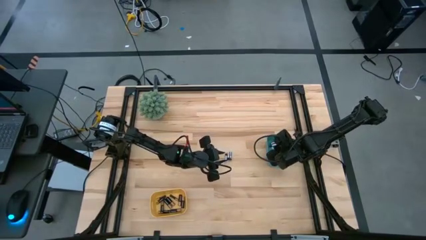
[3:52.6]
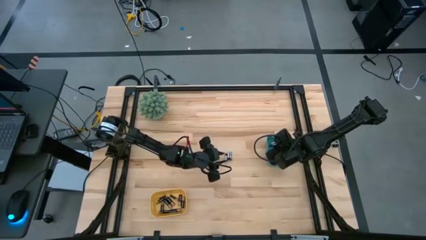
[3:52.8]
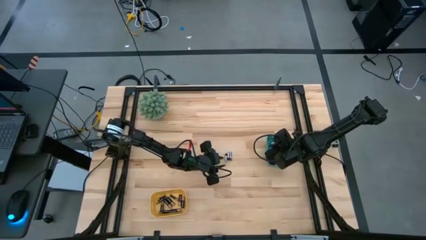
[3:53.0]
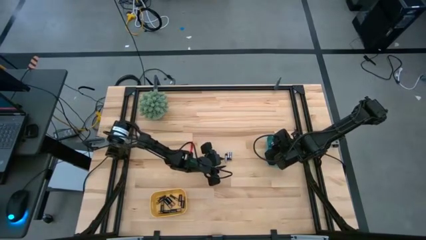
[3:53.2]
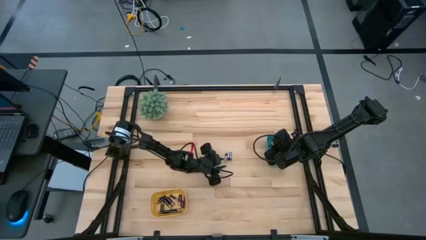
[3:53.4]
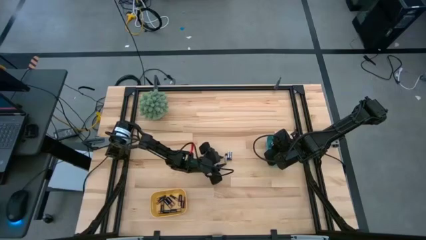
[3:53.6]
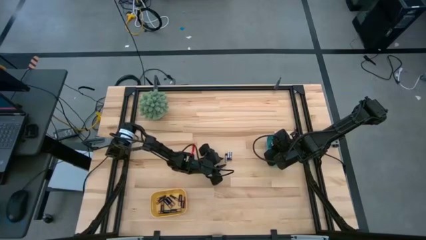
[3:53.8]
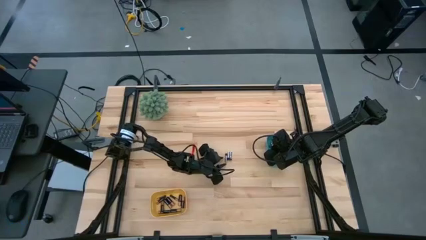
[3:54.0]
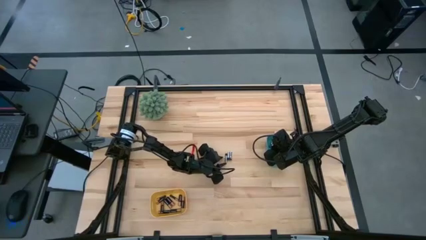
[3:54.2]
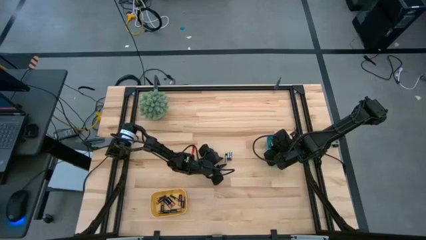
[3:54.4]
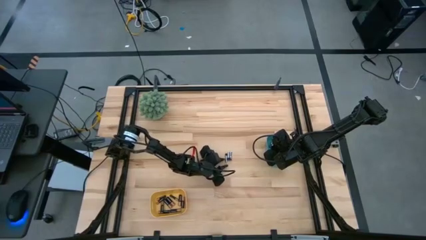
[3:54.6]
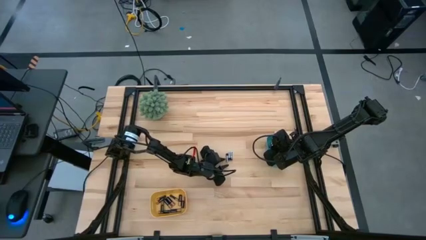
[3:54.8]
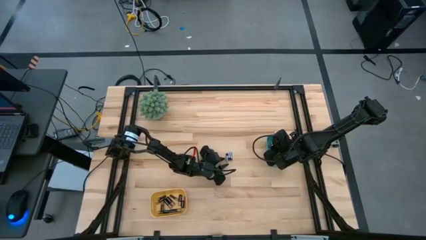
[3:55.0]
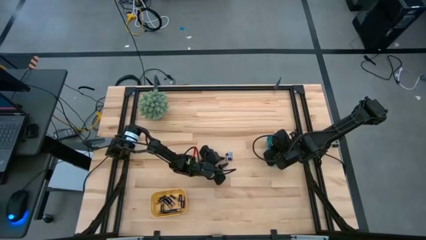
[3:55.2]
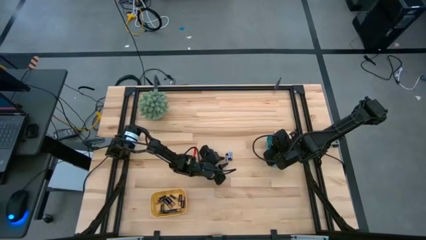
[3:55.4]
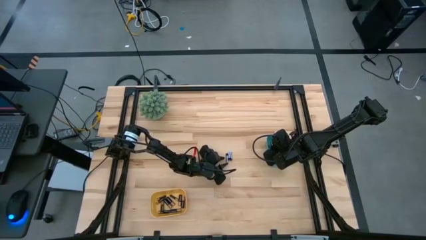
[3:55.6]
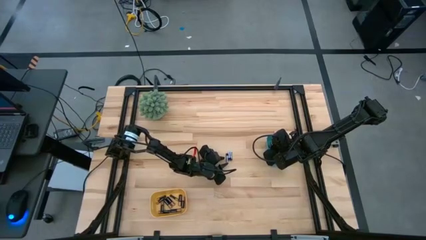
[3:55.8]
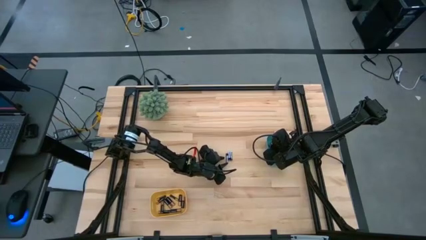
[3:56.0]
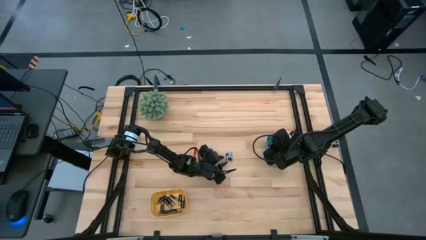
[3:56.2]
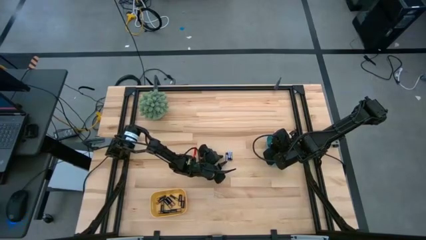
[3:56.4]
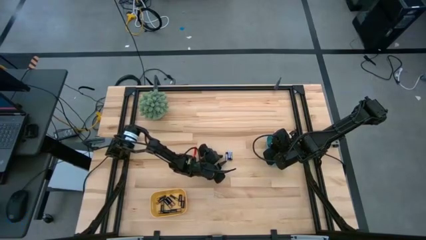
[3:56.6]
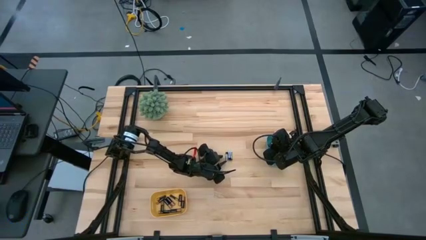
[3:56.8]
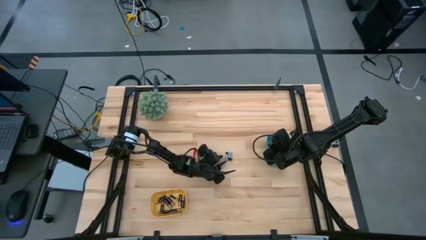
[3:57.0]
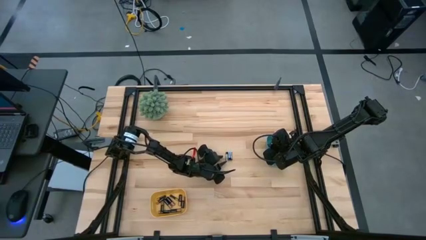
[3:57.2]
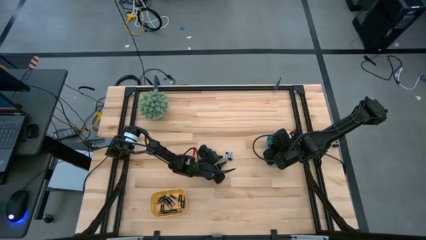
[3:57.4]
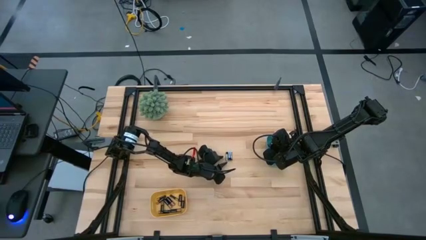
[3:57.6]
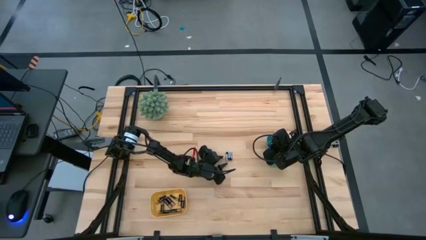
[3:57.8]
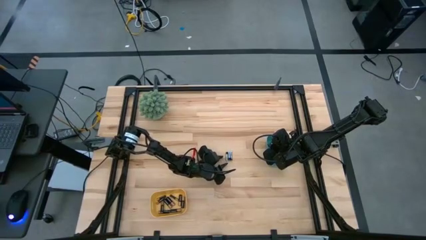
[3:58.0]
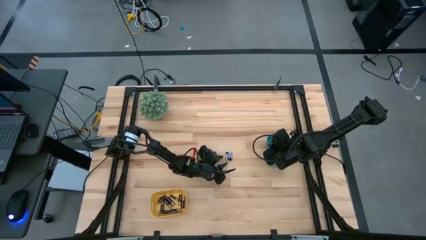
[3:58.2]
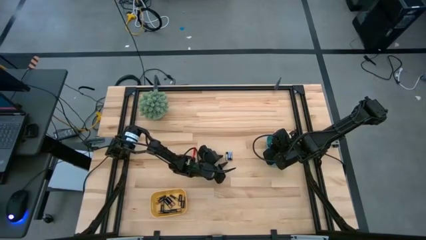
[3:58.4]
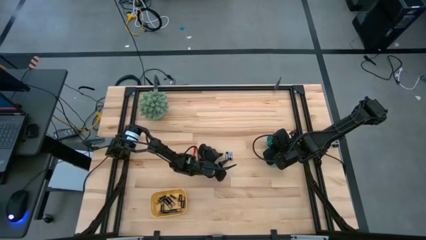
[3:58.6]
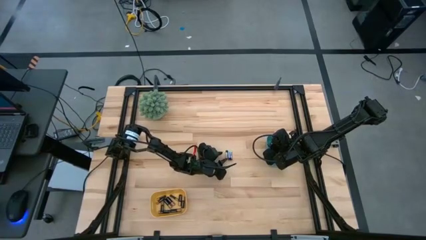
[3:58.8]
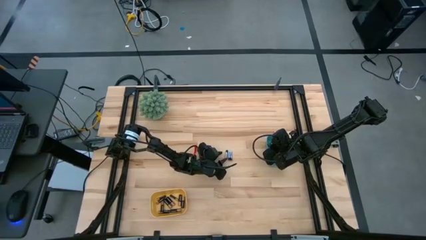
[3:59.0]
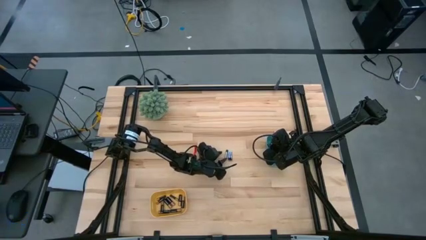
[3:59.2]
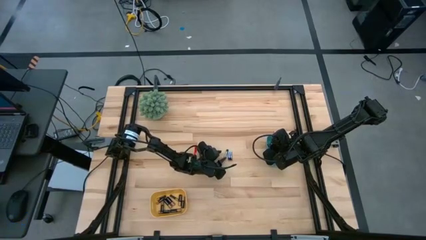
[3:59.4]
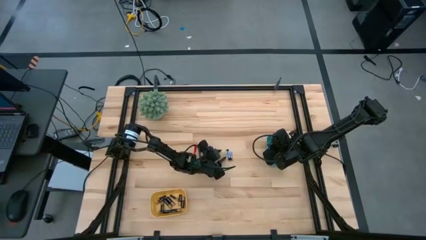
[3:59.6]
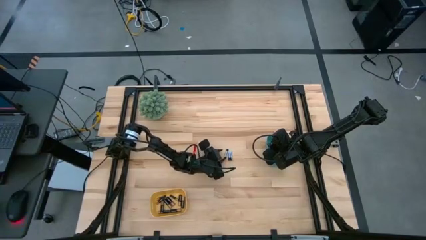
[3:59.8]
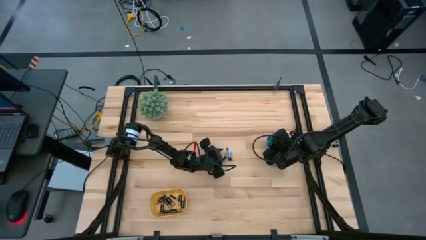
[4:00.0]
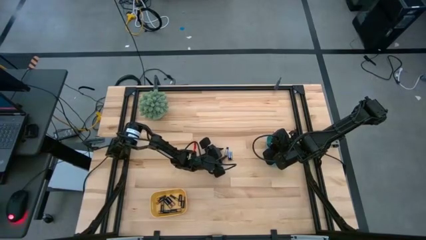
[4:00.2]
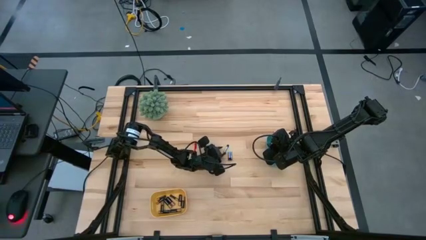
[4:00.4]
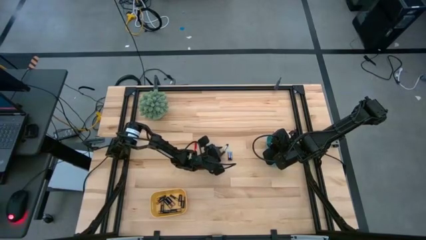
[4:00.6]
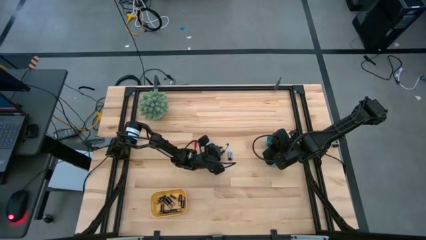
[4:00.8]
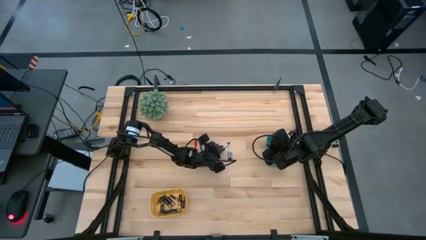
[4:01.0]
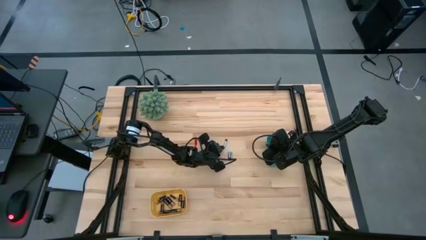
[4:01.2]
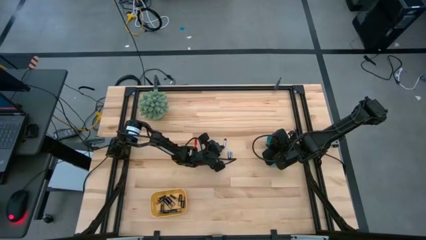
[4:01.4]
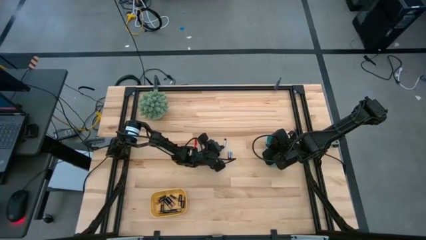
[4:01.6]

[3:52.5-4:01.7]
Task: Sort batteries
Put the silver battery into the green bin

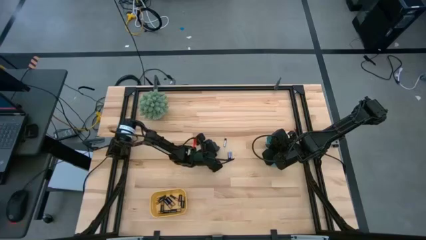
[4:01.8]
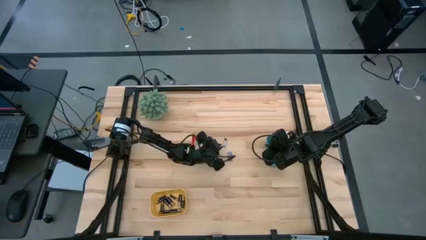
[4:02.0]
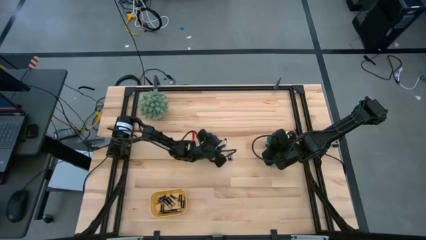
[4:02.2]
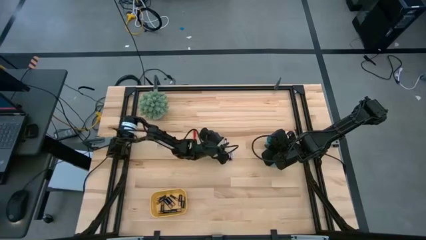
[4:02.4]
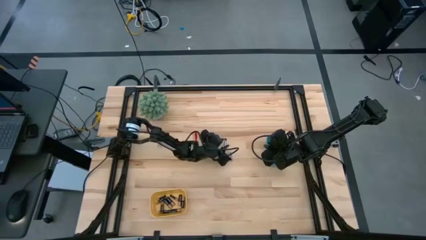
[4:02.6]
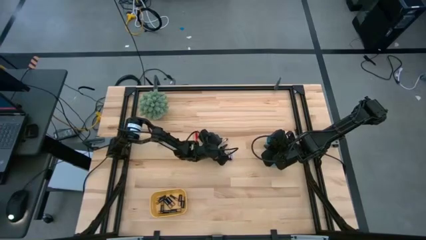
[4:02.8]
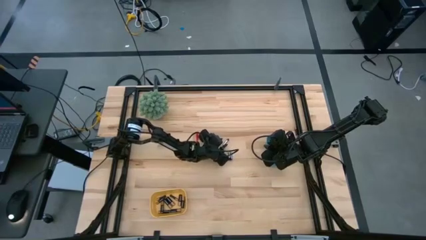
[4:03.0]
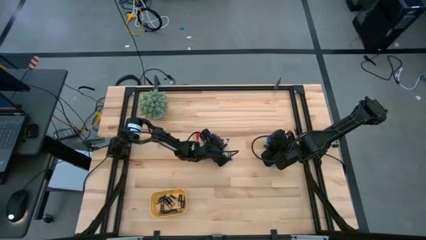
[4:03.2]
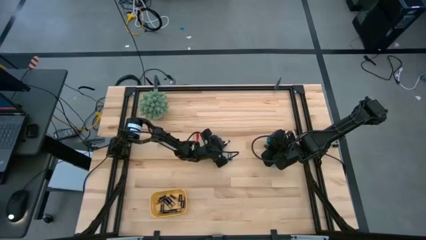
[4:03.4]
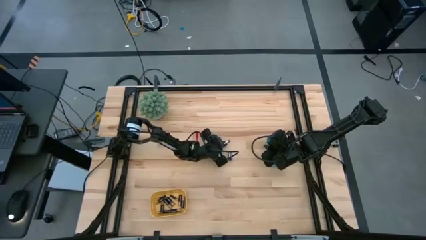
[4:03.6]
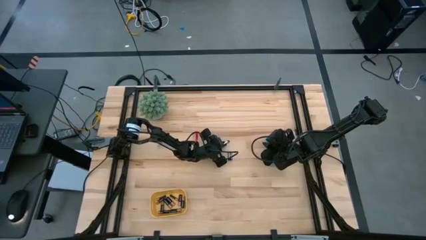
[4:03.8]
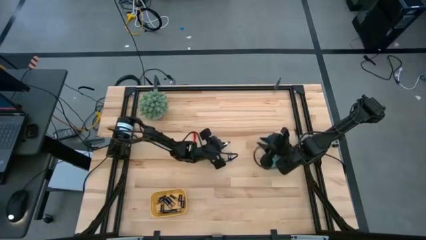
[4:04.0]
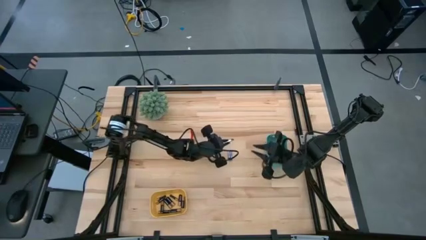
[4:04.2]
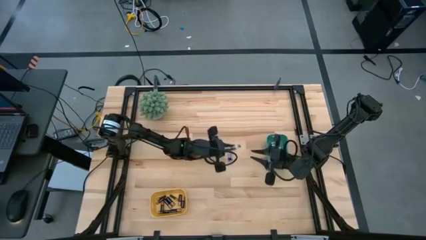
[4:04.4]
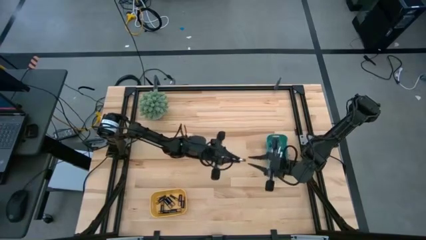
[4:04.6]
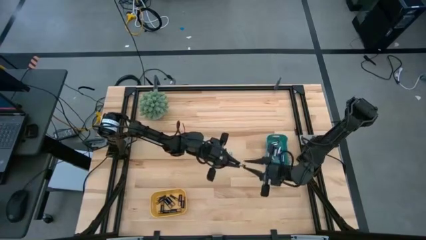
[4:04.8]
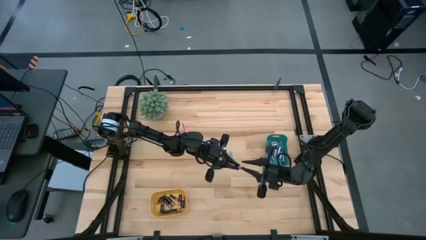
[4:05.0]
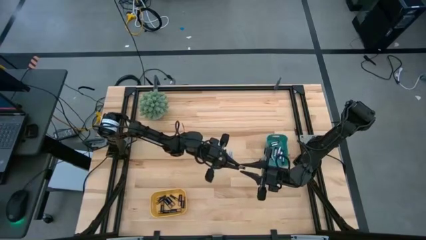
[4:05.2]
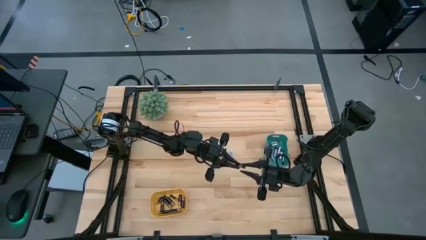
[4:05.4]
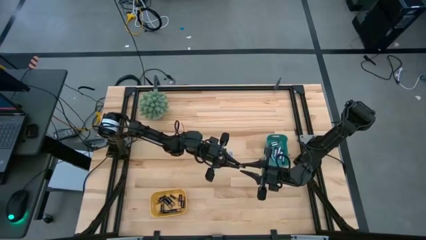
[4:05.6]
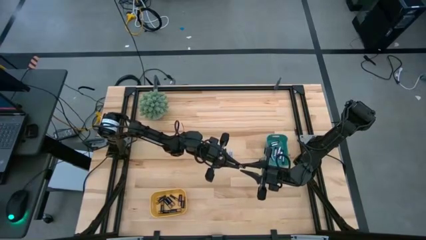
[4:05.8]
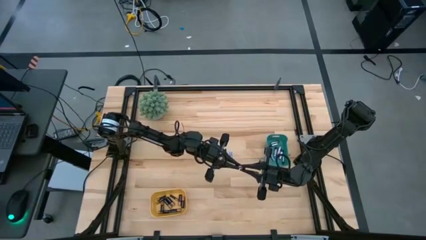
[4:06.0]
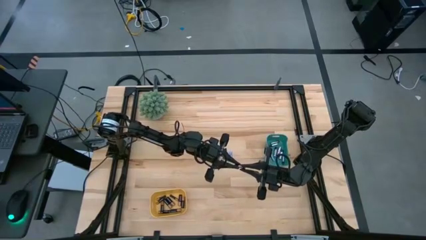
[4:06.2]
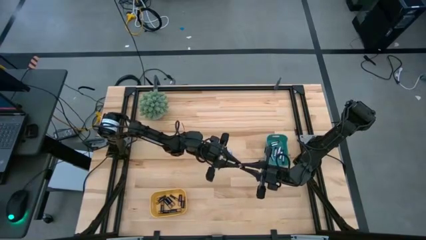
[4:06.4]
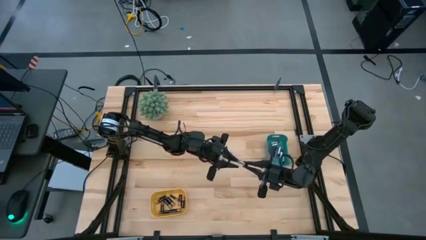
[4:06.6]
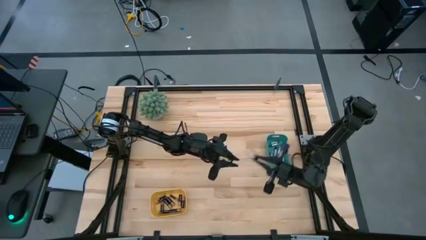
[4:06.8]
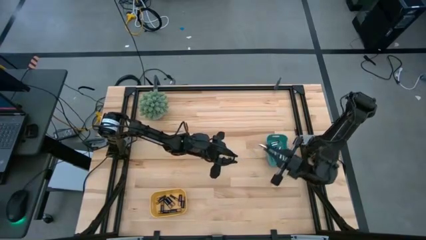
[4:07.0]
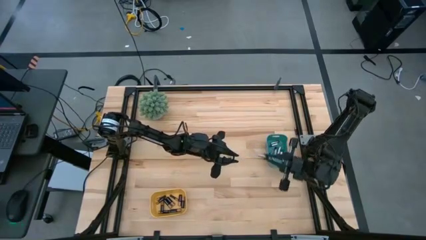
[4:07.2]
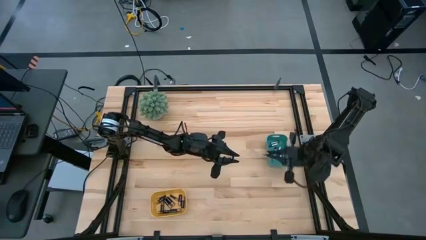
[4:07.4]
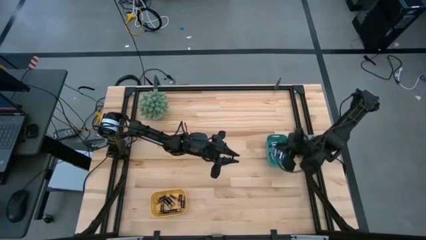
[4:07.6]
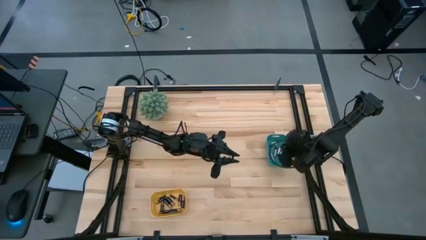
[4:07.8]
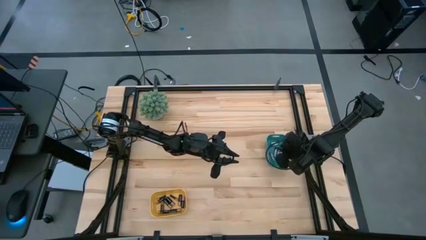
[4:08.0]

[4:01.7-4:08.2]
Put the silver battery into the green bin

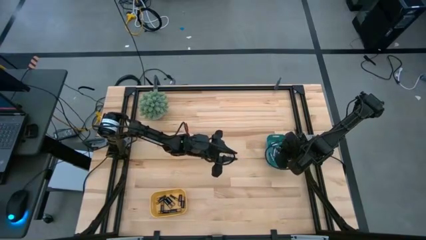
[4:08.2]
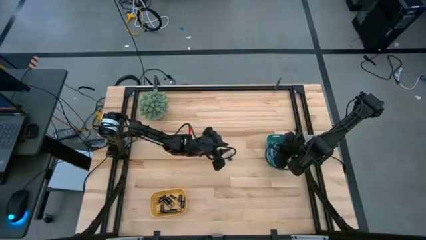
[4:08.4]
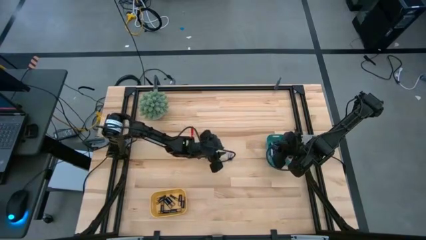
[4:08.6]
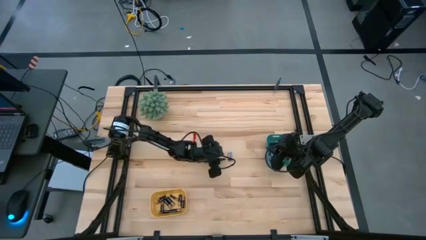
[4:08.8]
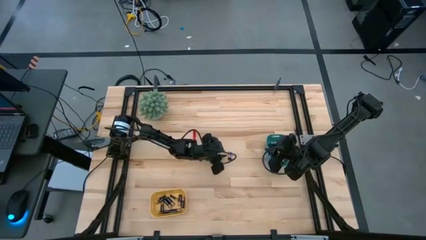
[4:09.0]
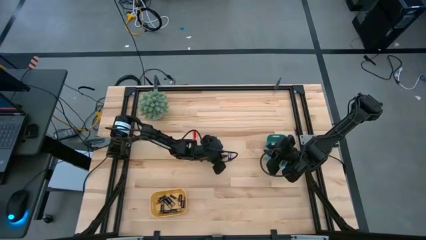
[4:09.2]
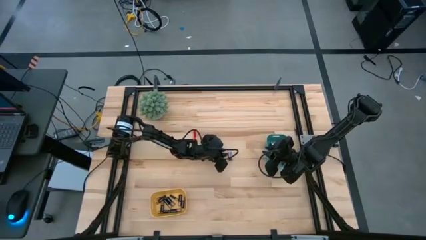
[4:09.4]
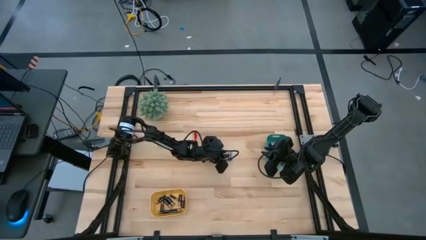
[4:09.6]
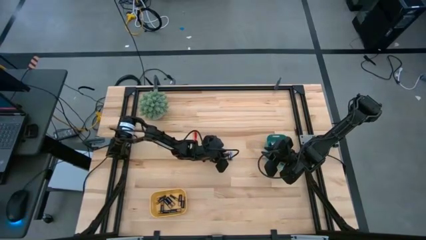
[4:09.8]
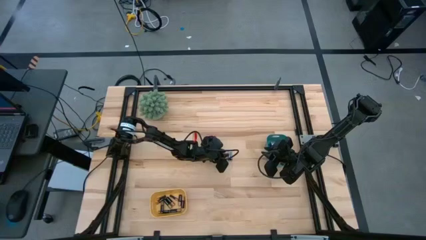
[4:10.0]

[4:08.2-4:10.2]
Put the silver battery into the green bin
